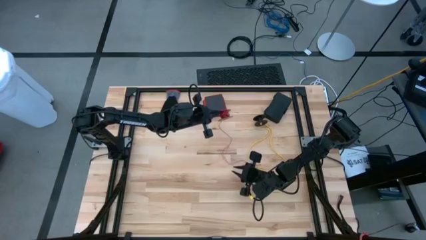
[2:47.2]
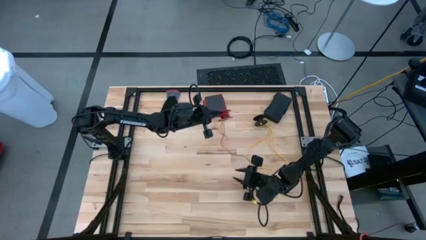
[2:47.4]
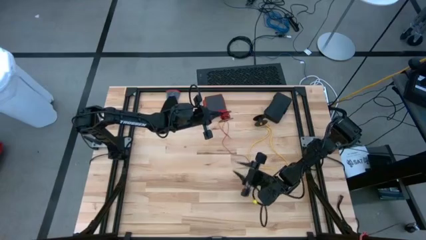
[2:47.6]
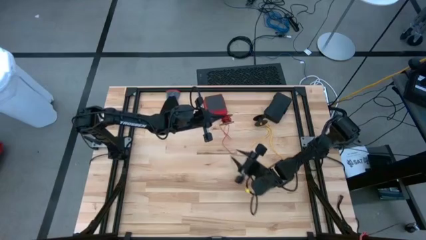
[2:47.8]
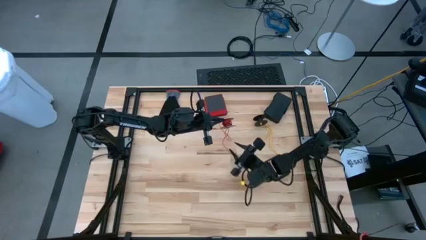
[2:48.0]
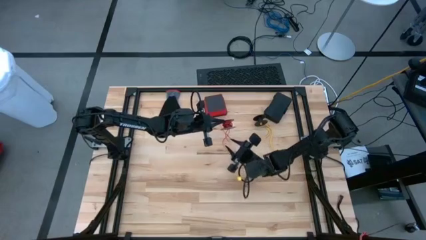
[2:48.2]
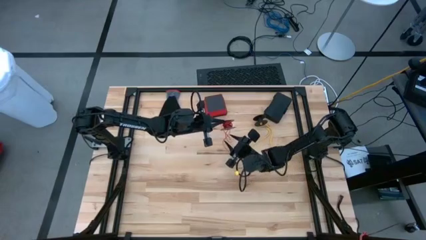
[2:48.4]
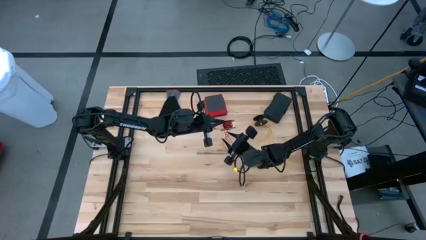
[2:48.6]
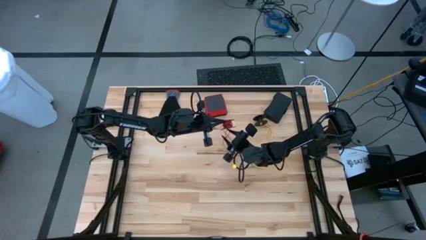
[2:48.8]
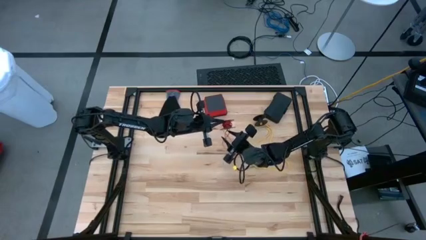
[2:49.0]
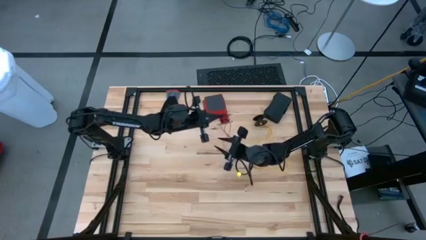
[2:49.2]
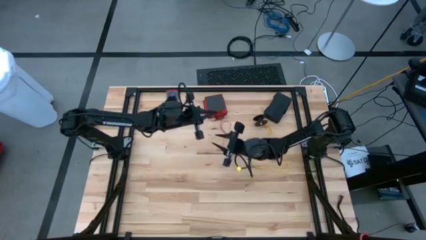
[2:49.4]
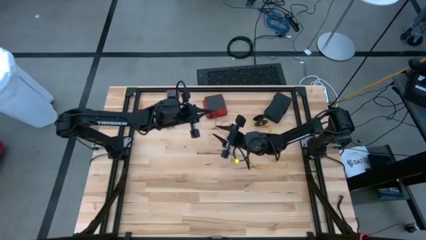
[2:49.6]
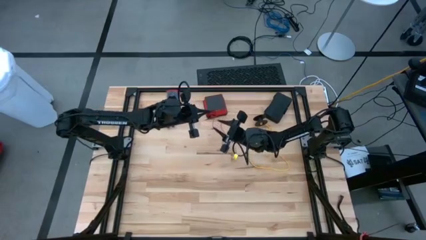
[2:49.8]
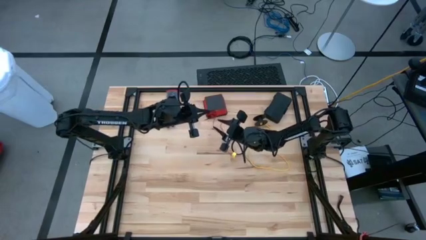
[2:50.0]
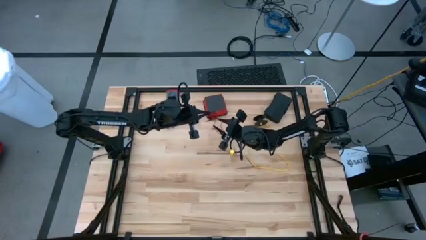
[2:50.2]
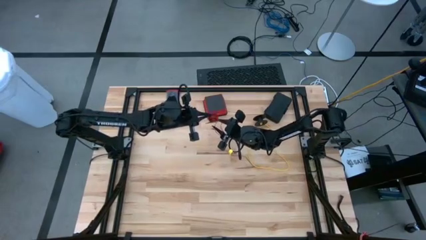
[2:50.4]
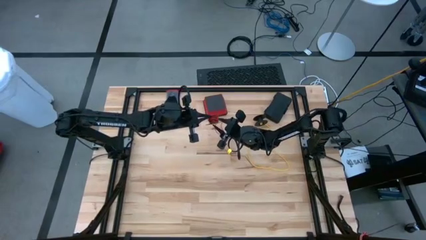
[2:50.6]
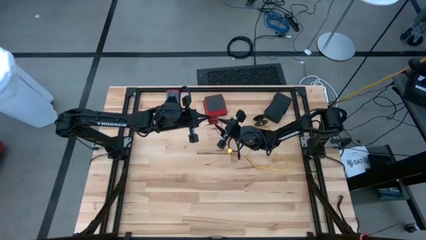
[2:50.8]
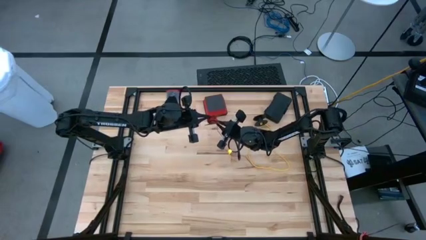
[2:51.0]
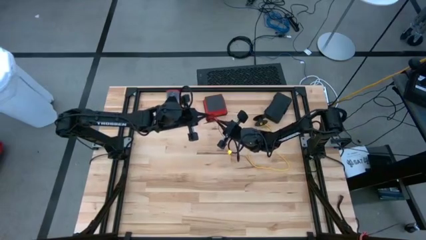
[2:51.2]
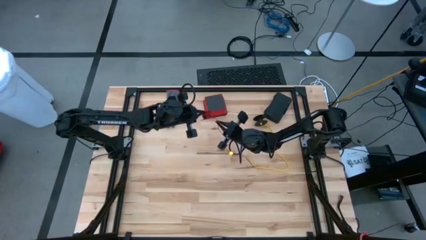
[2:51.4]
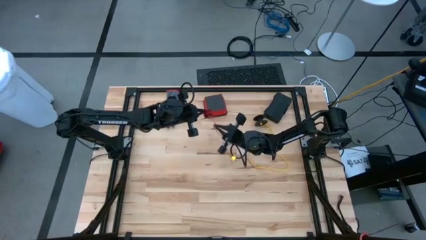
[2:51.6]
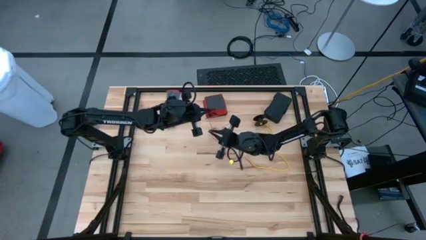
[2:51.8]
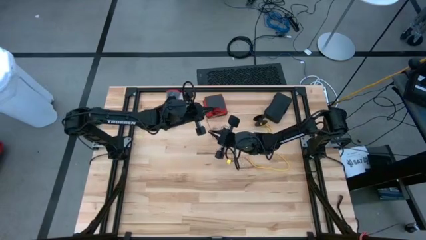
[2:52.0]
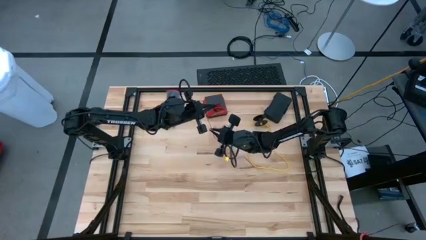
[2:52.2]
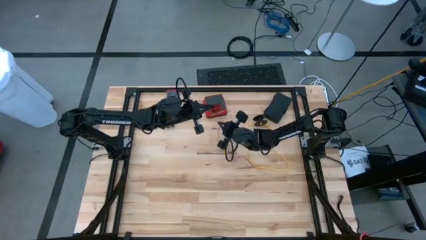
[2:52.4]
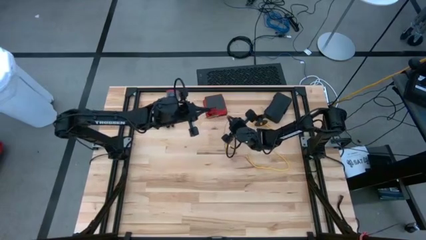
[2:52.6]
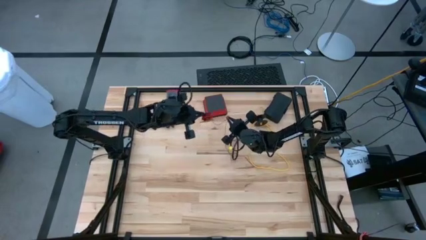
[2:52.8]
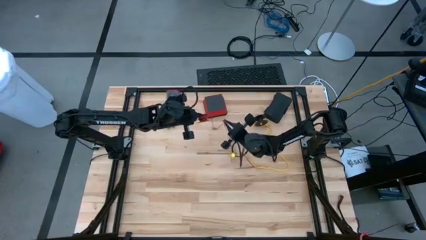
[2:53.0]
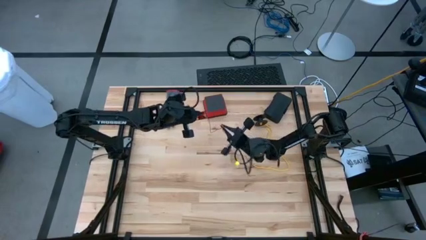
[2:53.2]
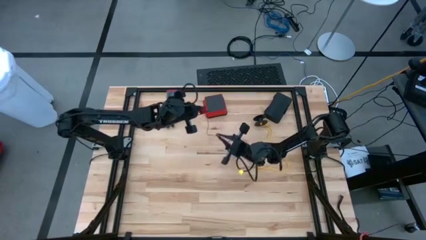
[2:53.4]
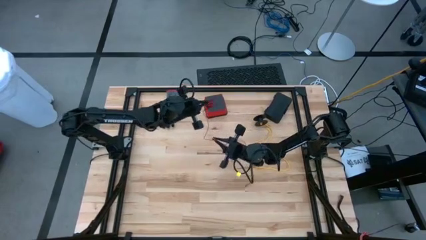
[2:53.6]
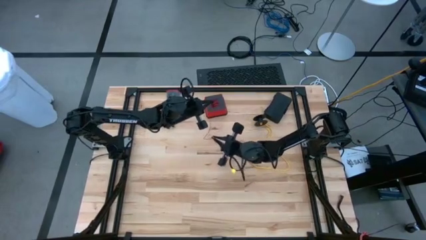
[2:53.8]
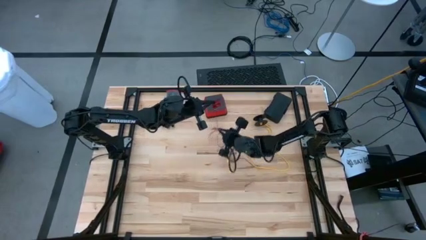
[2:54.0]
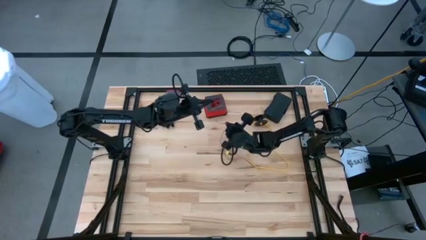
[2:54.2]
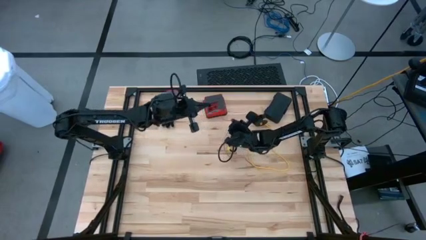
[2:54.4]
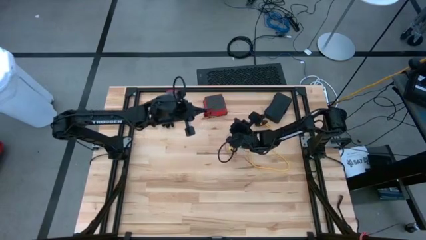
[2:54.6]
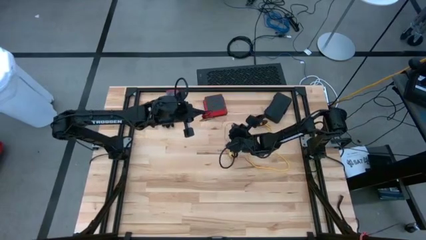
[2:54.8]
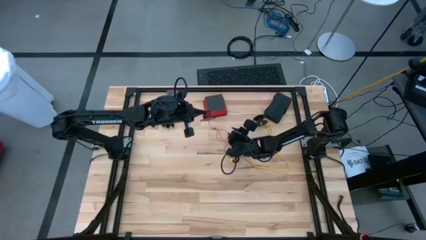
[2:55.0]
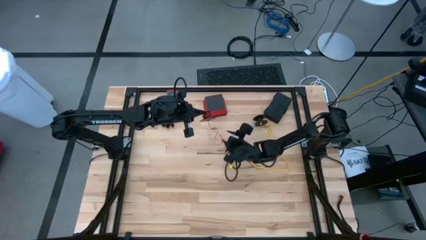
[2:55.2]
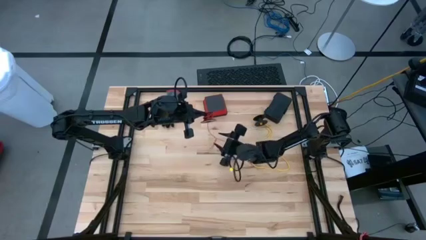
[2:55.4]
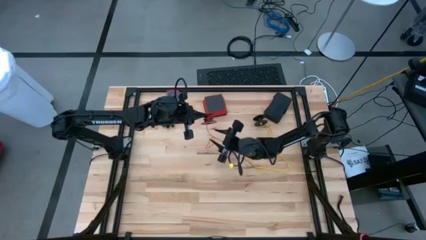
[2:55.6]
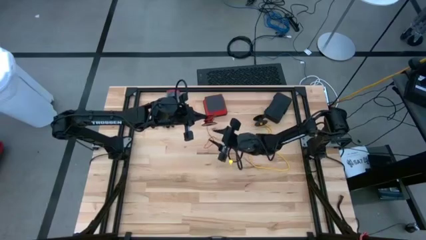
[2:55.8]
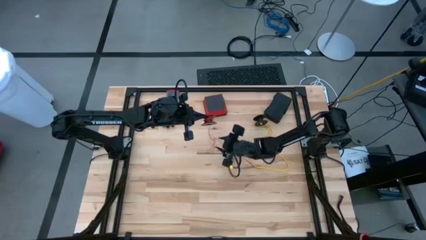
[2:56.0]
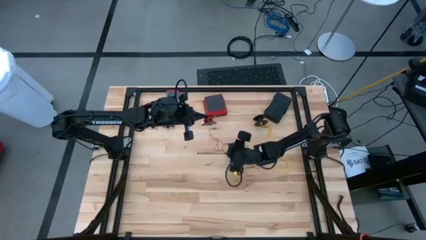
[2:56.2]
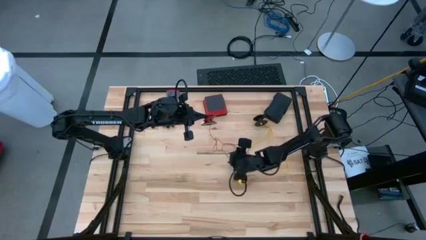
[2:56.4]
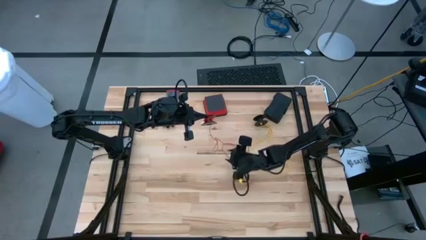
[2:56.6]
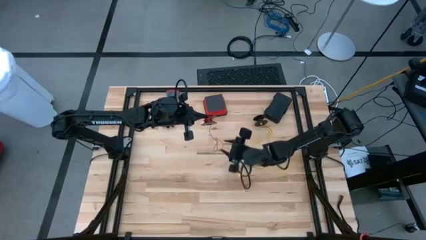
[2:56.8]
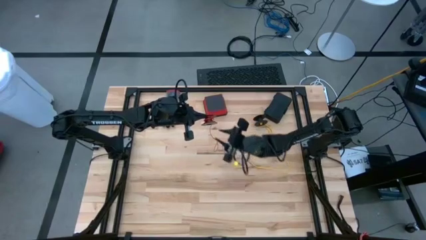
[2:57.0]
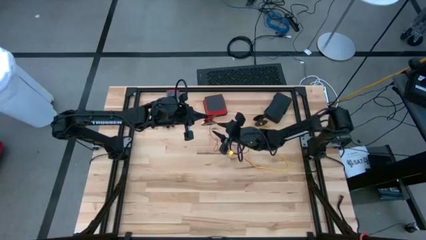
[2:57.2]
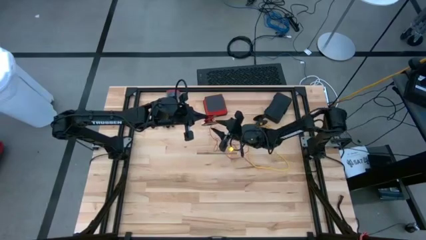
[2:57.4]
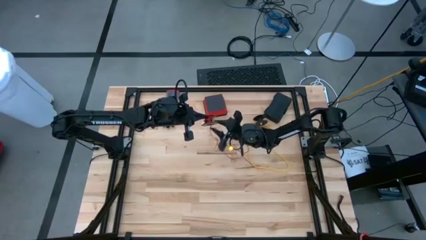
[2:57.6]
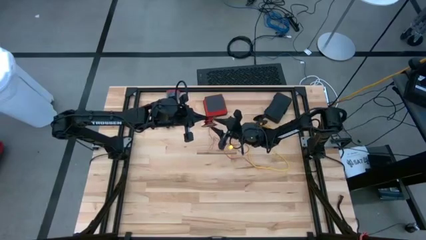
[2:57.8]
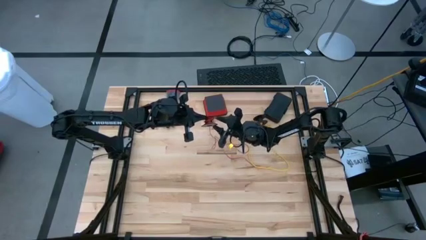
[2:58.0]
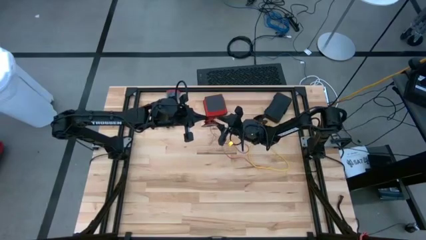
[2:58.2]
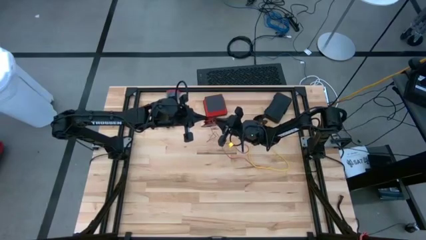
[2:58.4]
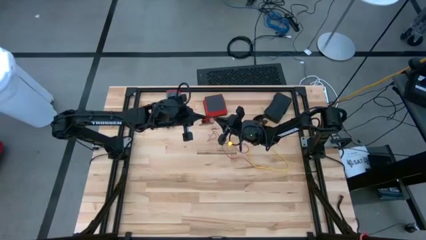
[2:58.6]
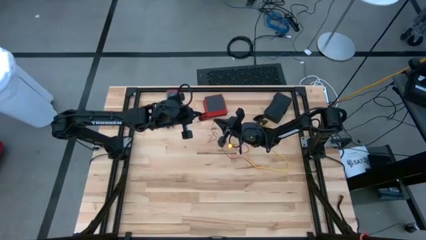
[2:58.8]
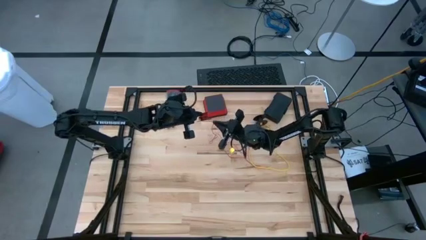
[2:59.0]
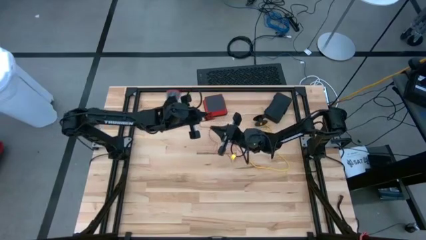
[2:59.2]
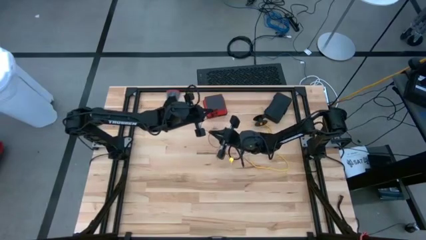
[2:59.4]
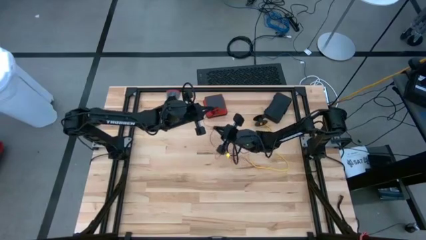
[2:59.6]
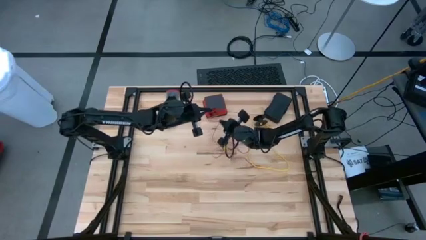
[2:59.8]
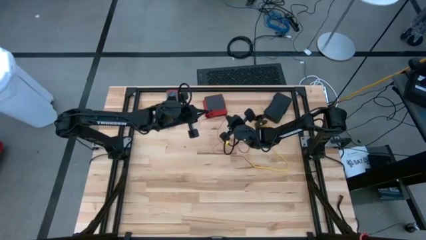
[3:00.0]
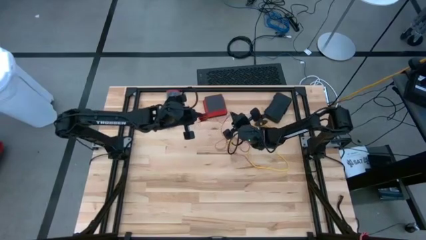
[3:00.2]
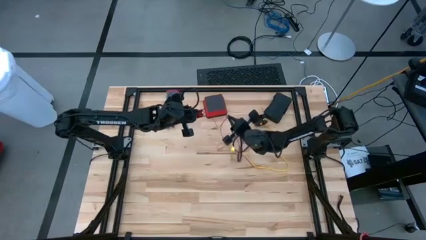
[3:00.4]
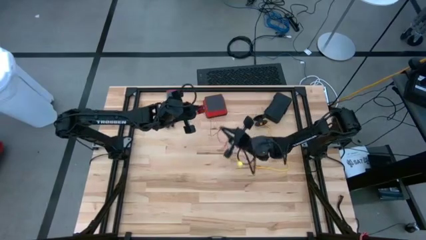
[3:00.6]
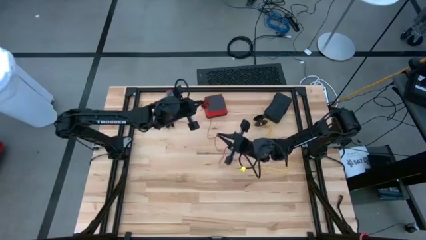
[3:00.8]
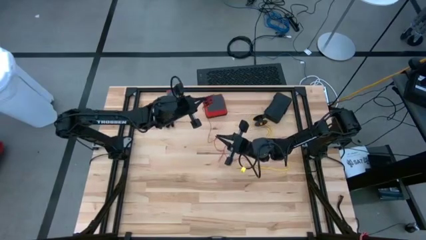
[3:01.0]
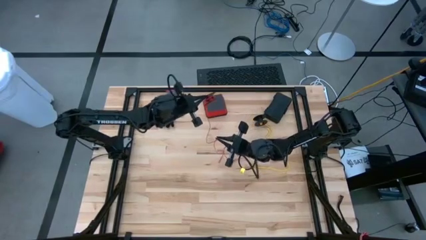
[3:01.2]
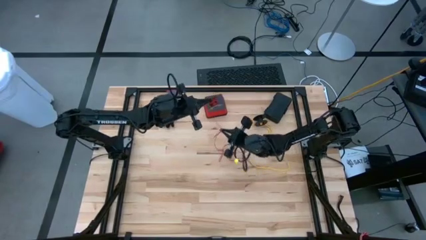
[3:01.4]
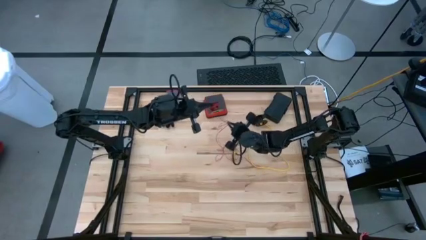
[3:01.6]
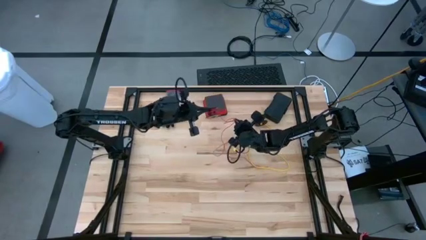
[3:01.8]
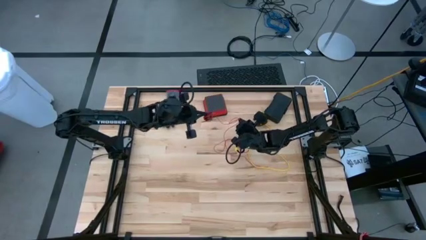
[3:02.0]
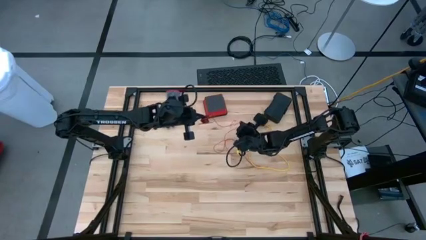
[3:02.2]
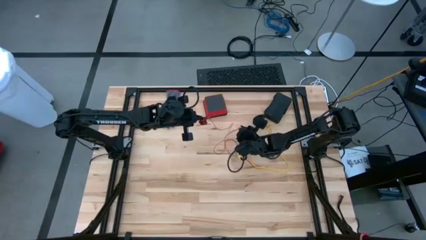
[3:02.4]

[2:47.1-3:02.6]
Task: Coil cords
Uncoil the red wire from the spool
